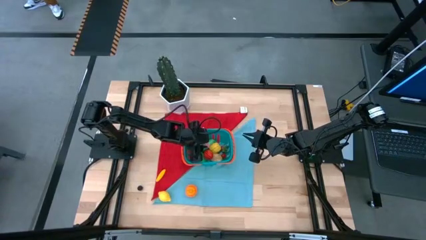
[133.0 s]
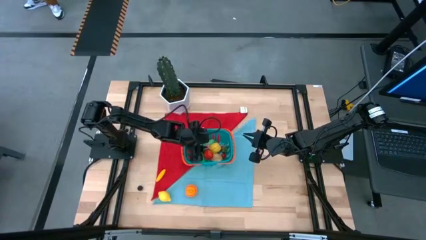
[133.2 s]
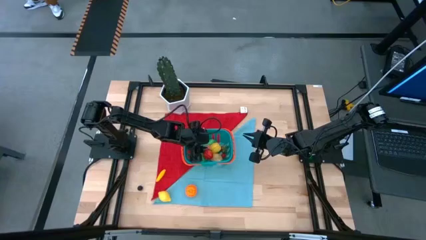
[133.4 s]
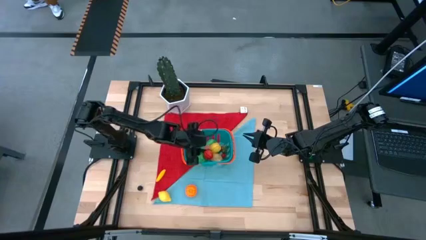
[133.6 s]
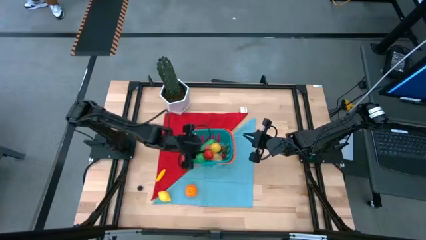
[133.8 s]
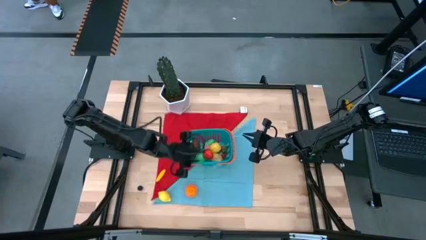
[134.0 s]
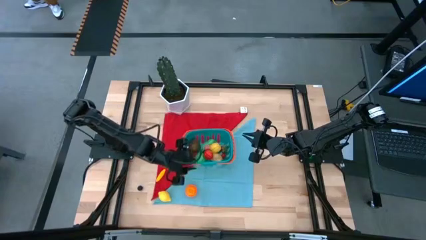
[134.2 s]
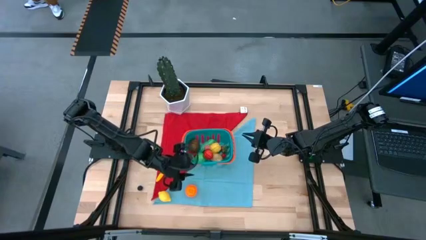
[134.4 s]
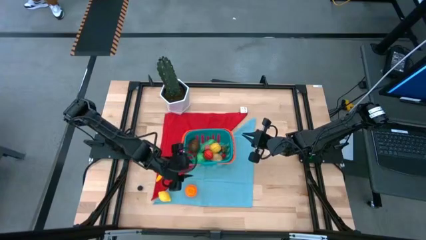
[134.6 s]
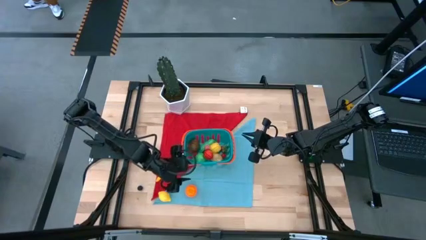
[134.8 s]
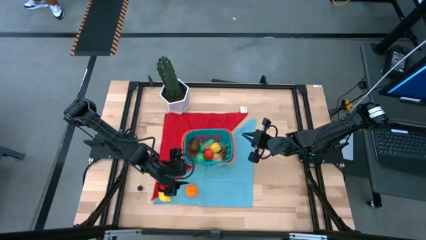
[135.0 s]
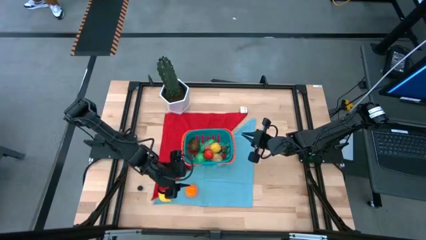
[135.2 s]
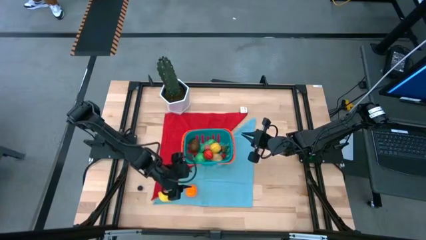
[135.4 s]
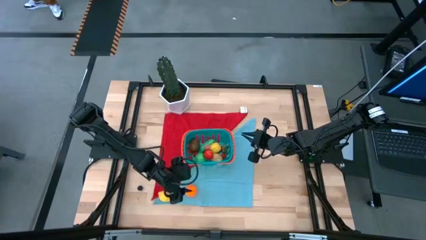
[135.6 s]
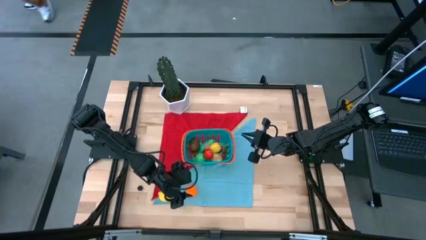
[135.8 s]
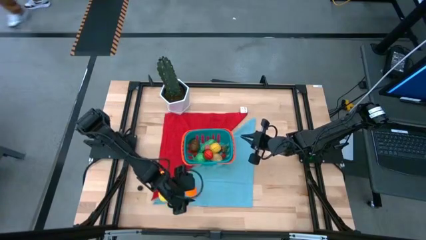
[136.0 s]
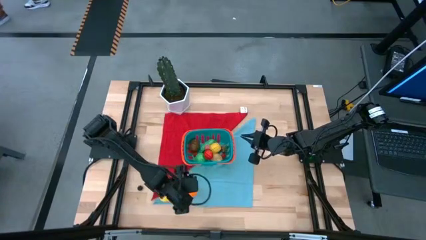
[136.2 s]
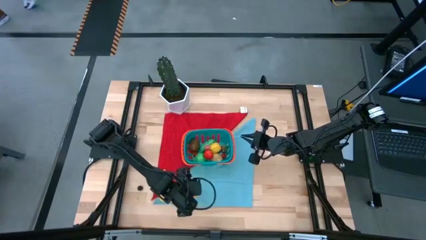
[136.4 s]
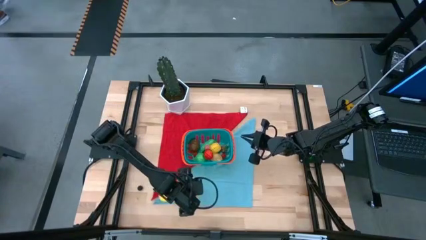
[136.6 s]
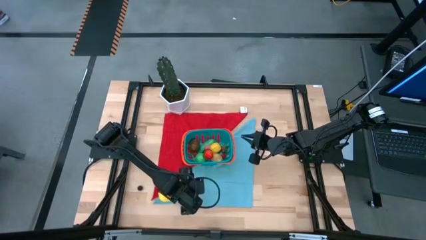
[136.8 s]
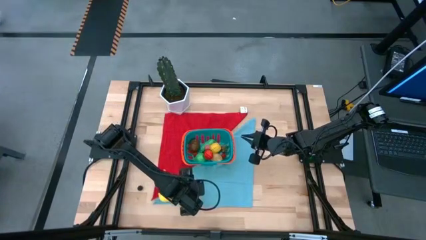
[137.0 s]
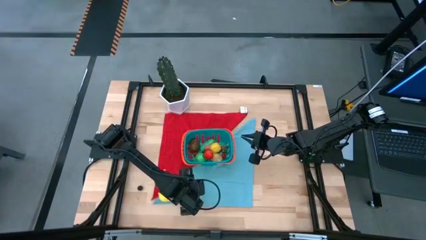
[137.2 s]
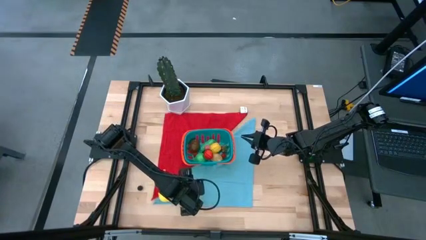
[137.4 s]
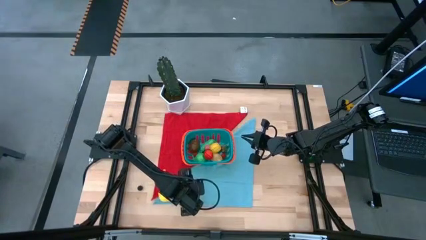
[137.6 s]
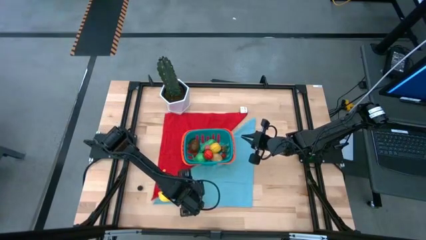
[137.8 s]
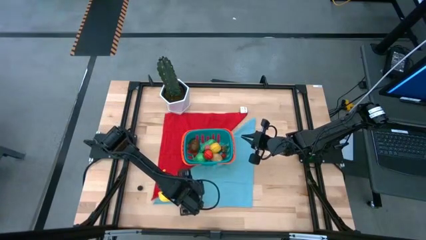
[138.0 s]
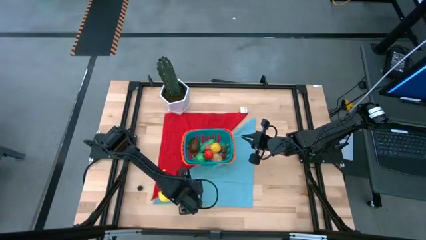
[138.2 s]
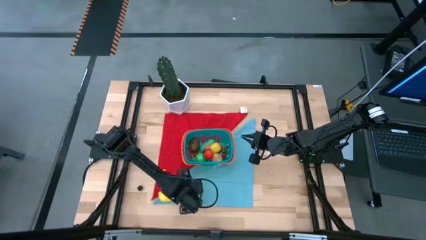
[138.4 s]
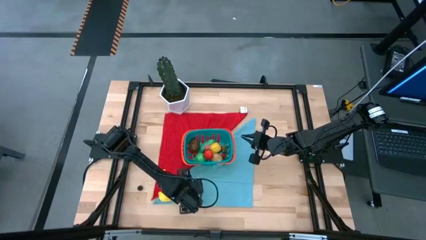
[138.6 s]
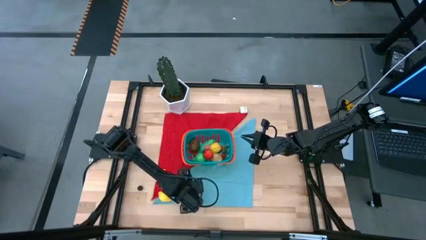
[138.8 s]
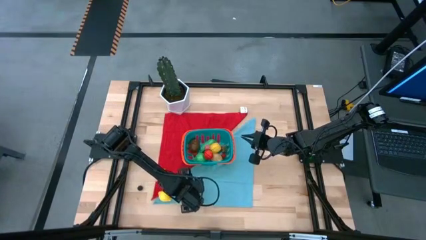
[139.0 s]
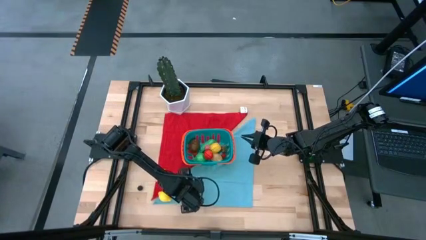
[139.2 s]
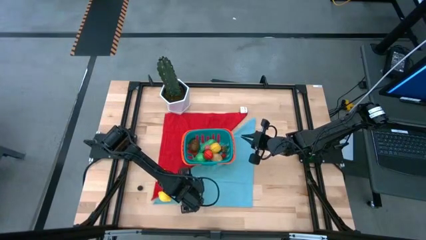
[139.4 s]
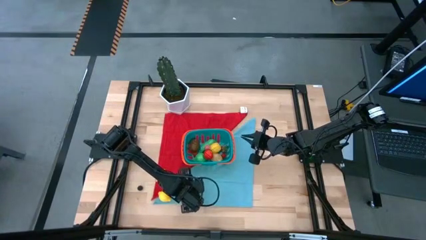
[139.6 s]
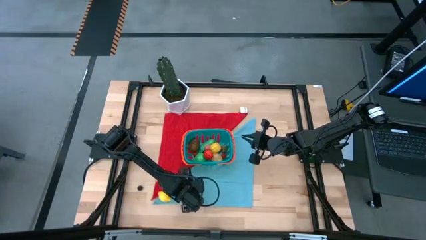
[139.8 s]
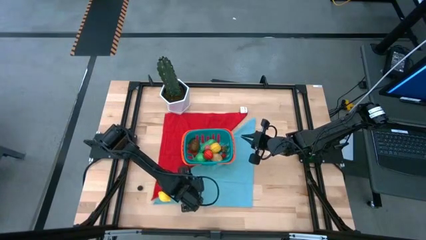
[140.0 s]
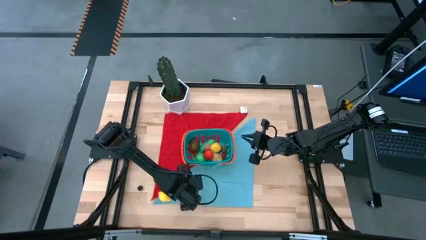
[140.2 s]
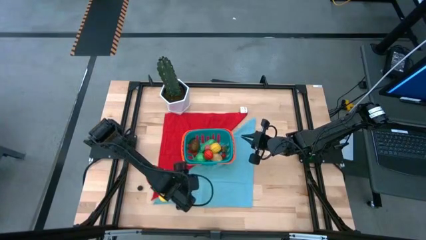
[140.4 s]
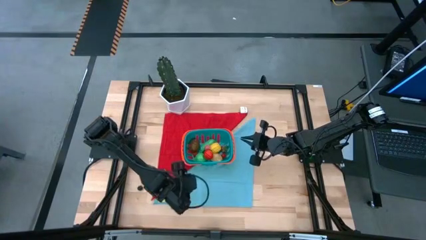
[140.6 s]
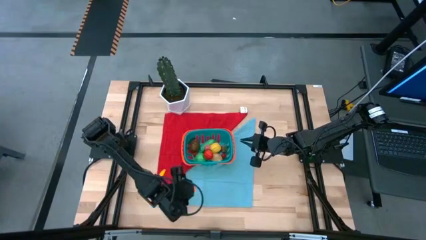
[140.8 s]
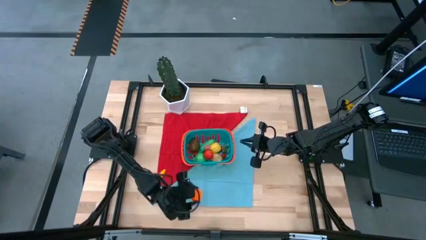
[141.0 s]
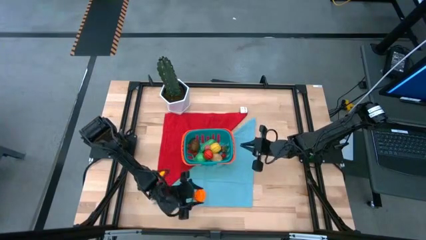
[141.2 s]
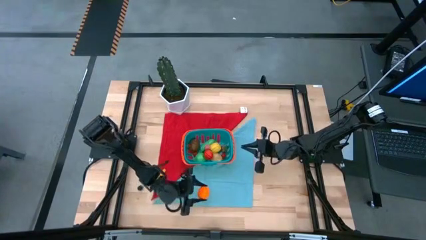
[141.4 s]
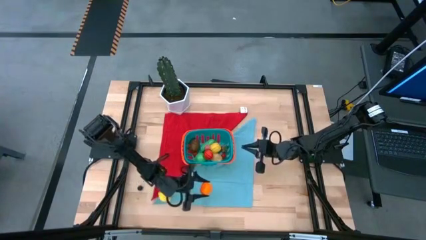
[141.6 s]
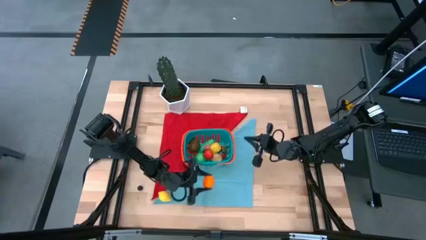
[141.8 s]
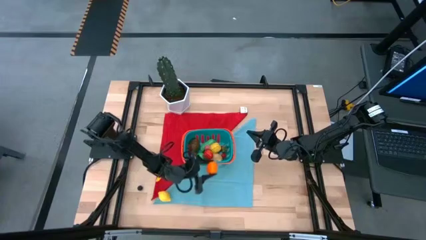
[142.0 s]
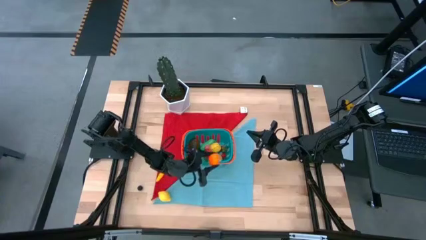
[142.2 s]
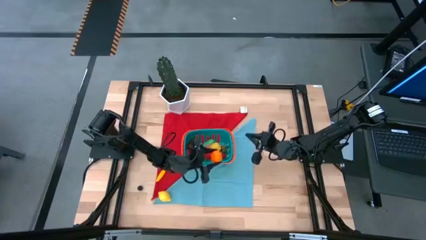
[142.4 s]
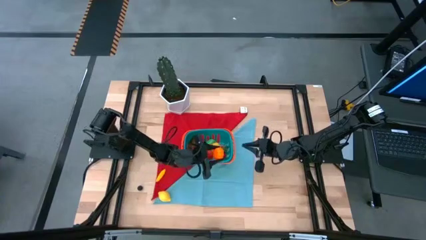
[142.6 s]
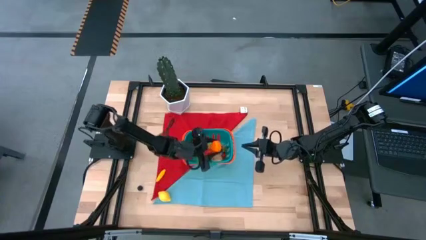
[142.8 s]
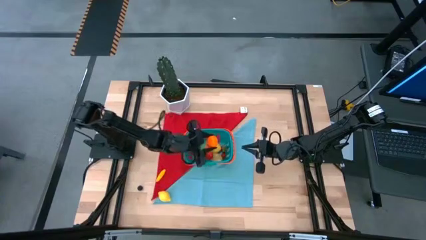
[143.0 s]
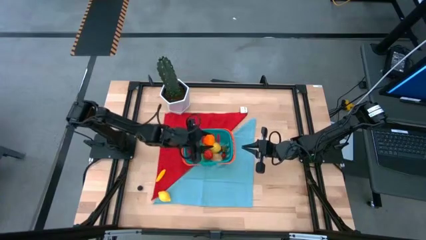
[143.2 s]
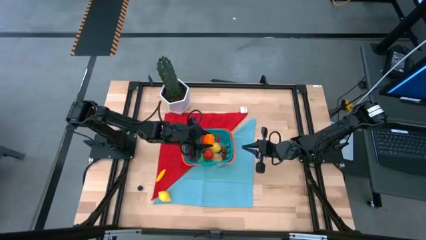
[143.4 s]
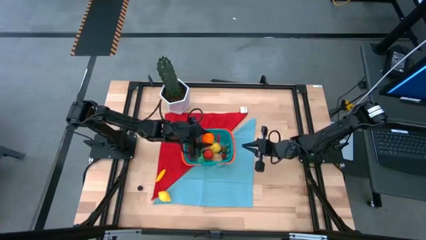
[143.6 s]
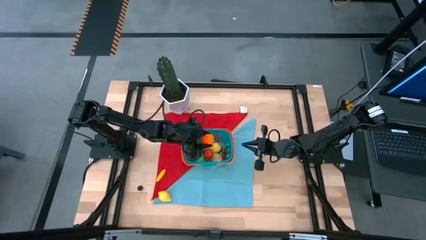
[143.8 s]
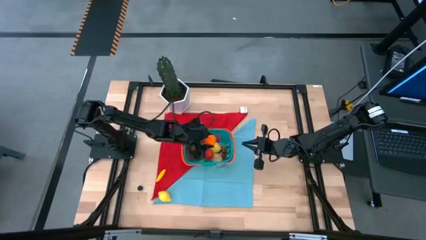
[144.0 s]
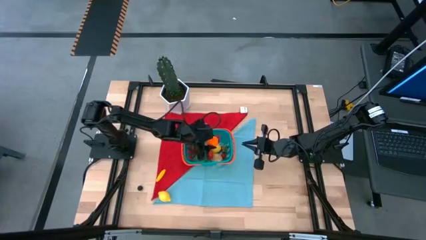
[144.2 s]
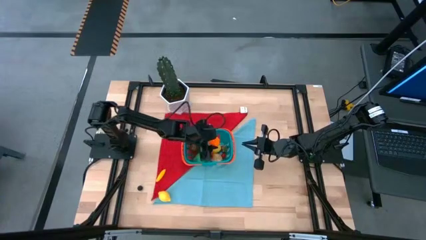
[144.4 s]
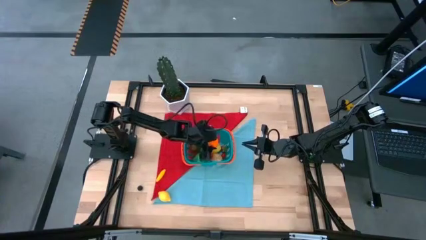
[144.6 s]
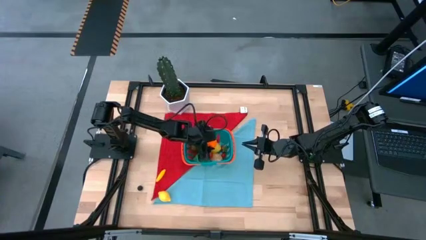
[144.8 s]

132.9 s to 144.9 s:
Task: Build produce basket
Put the orange pumpkin into the blue basket

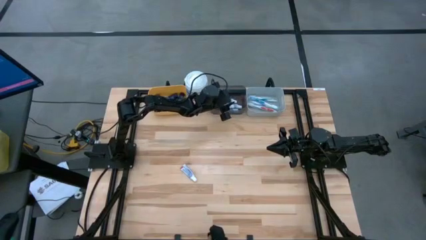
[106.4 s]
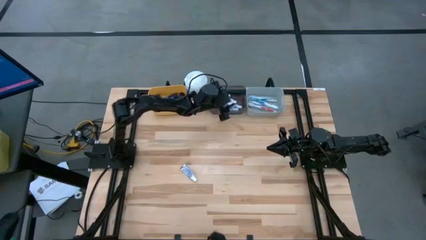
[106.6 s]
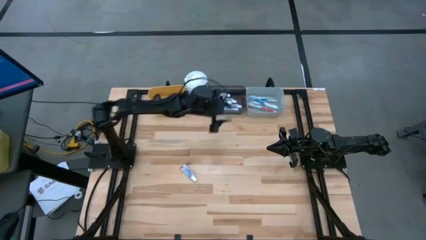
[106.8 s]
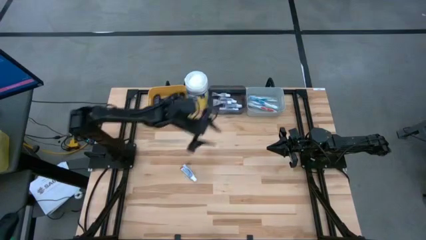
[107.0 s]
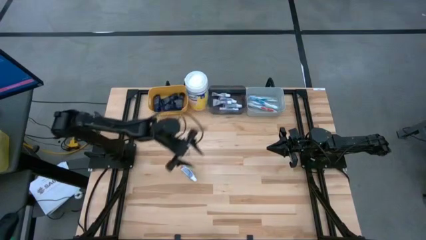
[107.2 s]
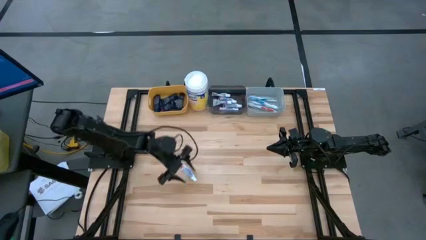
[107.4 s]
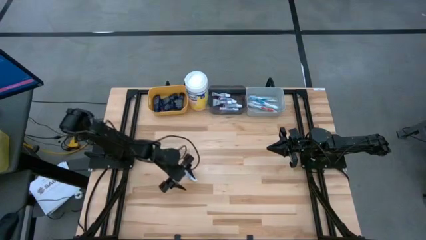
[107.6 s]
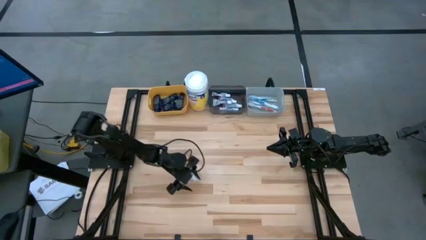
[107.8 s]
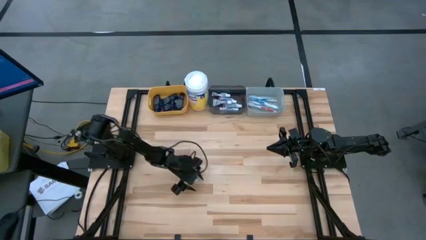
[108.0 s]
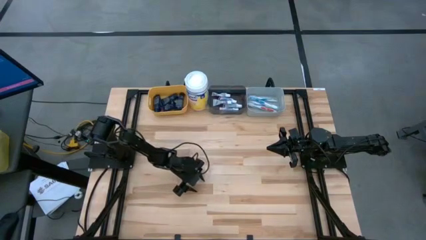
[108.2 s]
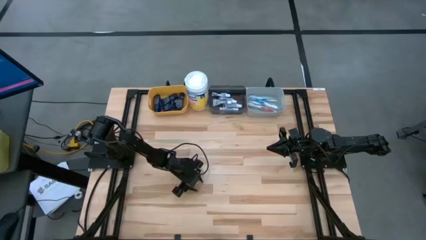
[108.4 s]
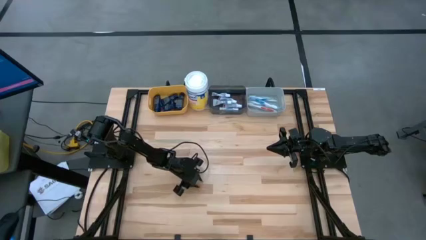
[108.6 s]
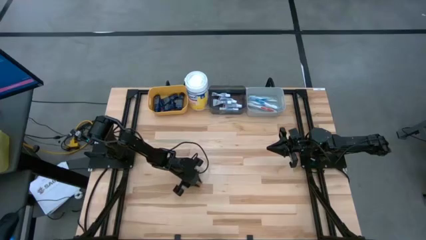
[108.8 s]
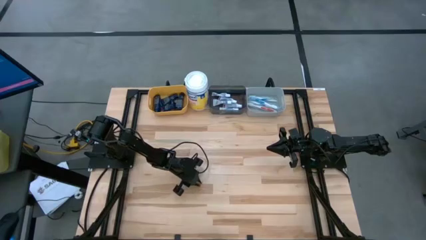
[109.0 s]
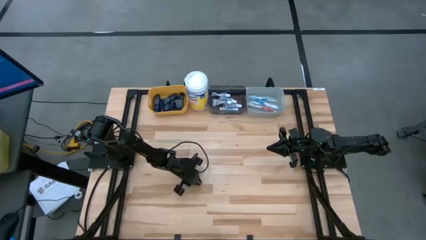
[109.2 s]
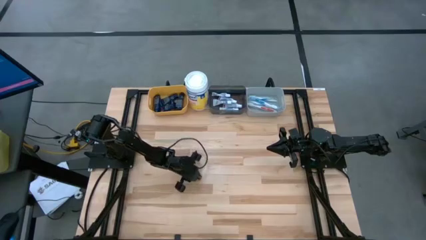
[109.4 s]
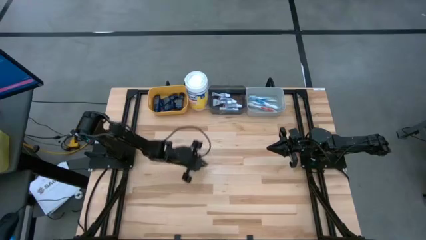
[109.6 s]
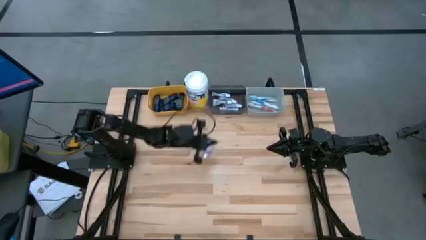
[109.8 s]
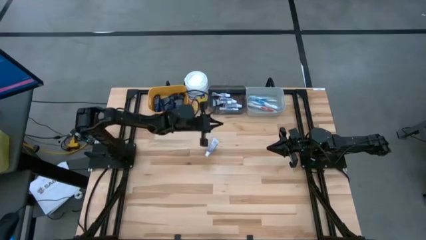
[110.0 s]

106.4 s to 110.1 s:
Task: Pick & Place Travel size toiletries
Put the white toothpaste into the black bin

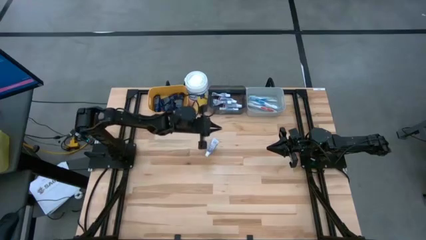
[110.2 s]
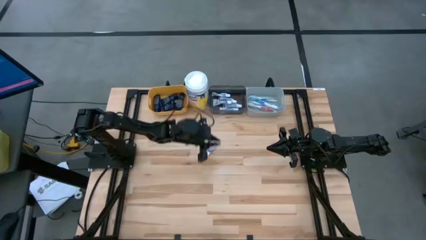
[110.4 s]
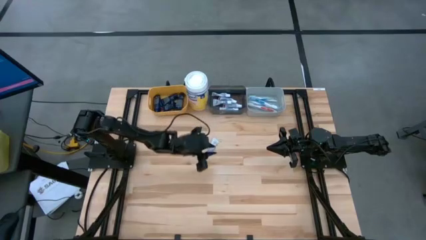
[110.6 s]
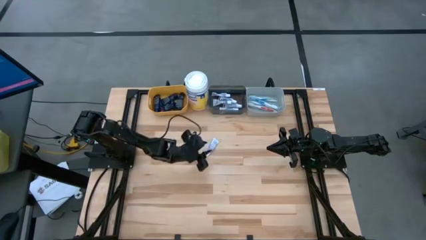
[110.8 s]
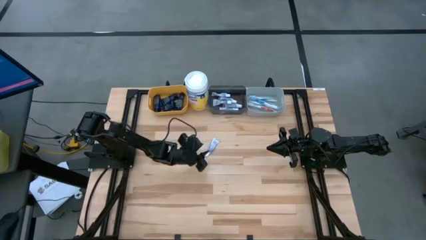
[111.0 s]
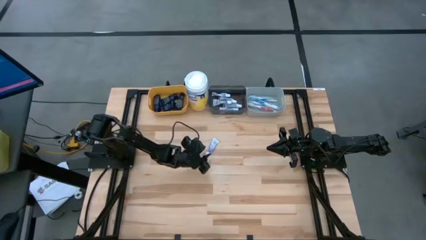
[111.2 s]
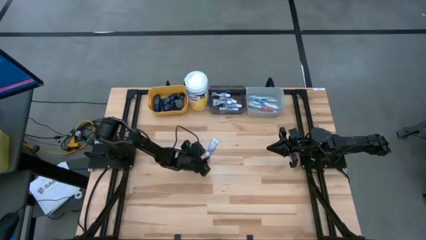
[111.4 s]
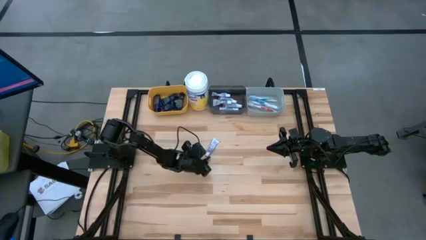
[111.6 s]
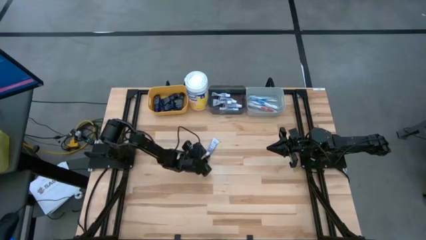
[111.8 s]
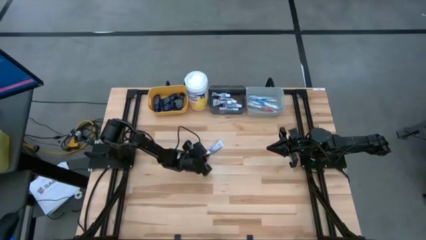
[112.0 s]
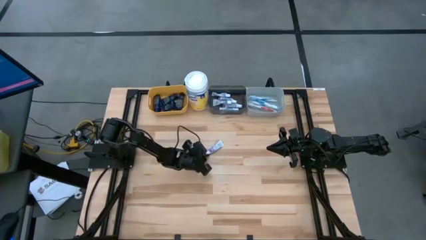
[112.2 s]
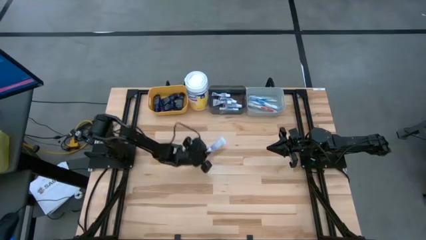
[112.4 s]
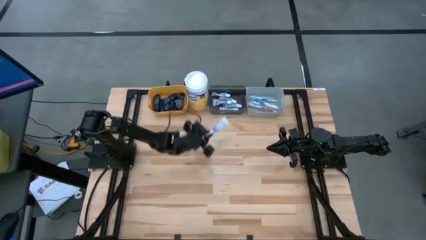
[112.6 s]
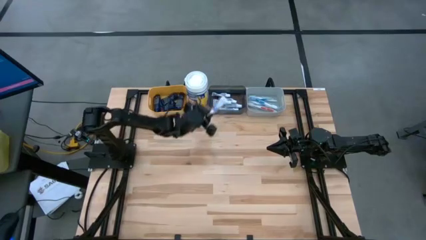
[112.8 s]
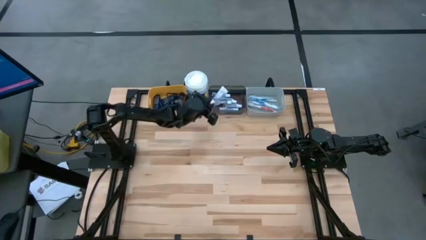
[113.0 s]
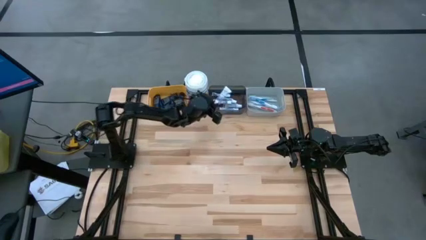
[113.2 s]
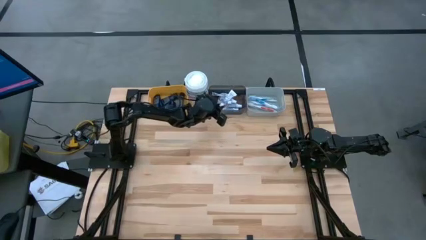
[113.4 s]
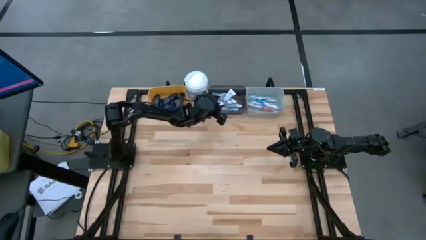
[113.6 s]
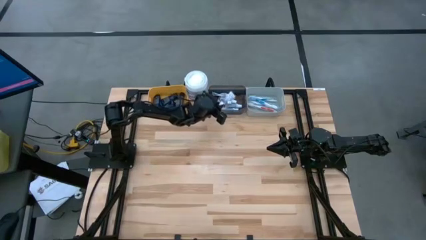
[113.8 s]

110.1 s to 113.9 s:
Put the white toothpaste into the black bin
